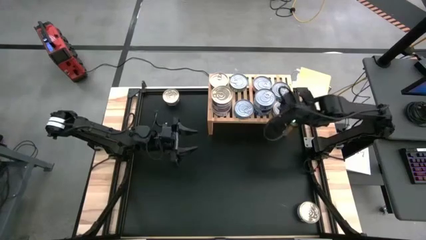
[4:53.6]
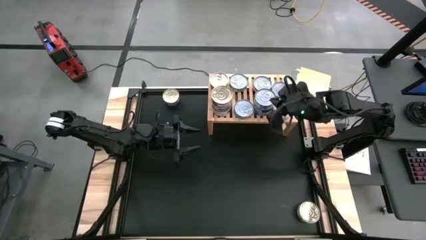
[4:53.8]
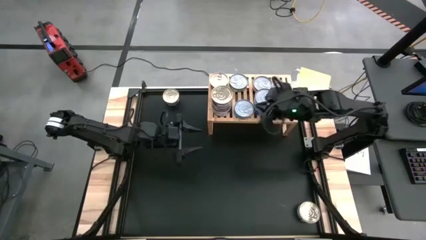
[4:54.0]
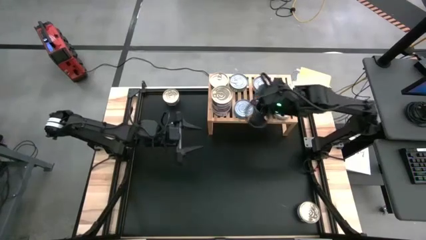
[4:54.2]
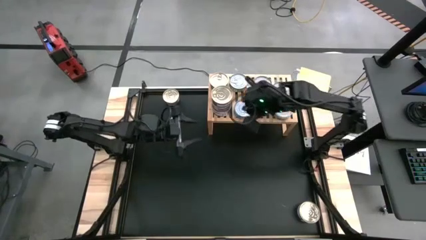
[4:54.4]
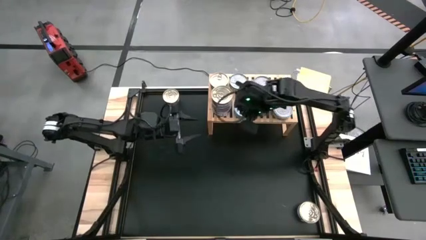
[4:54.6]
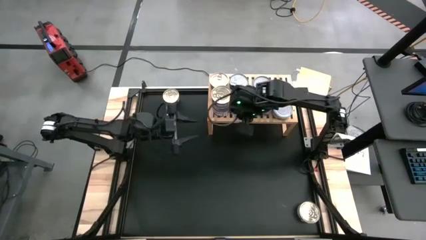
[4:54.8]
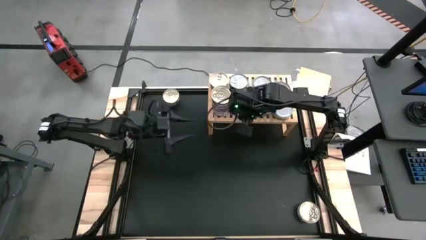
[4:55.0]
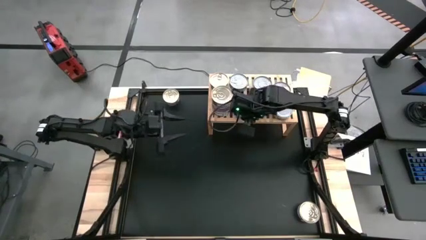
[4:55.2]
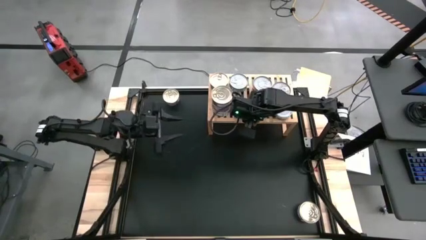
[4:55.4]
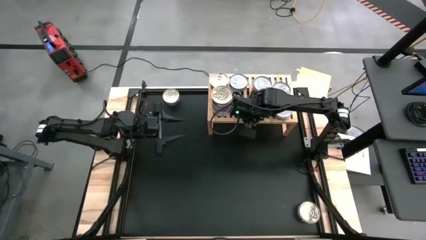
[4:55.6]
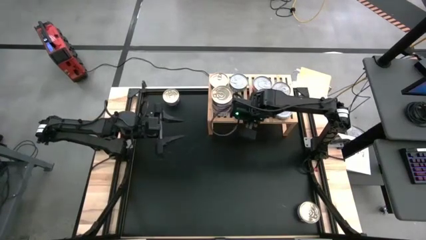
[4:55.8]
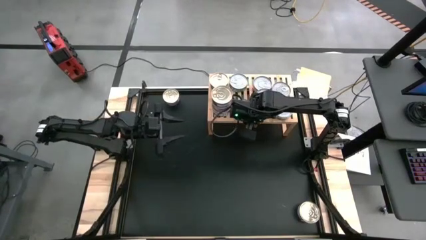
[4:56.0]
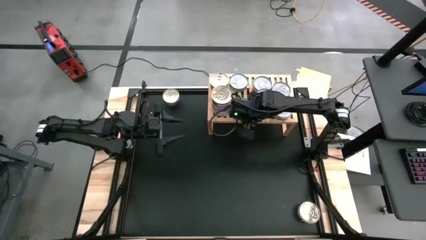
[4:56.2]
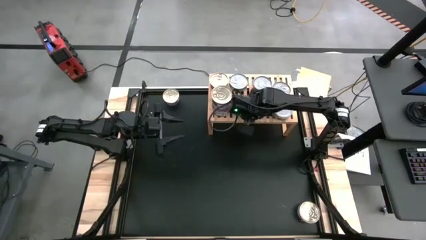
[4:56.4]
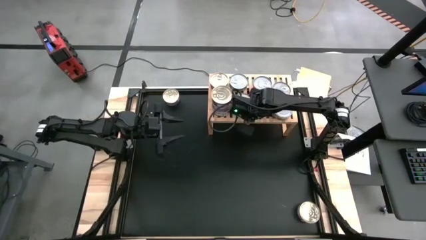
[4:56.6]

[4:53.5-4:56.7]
Task: Stack canned seafood by type on shelf
Adjust the yellow-blue tuna can

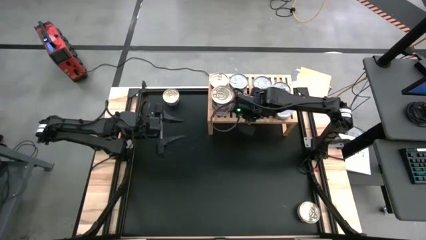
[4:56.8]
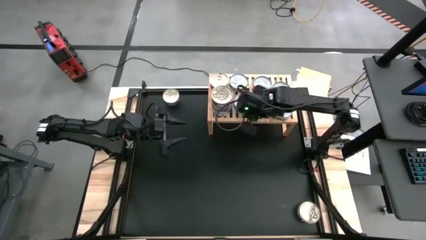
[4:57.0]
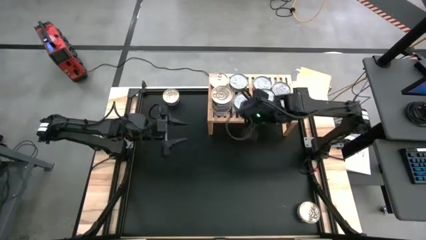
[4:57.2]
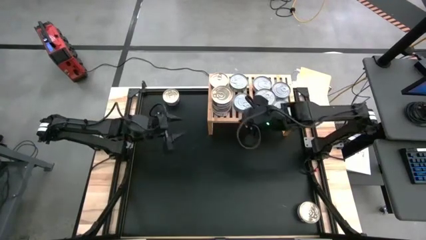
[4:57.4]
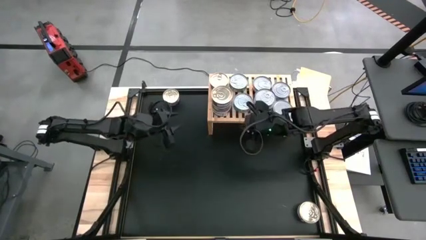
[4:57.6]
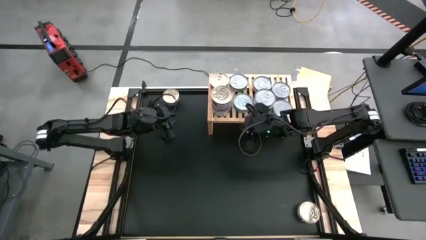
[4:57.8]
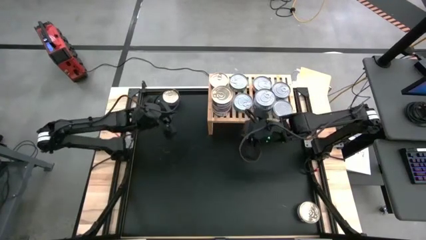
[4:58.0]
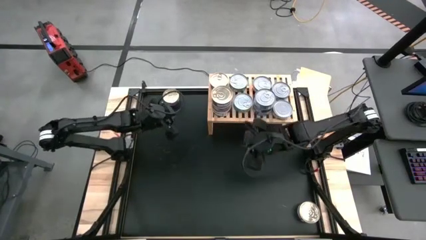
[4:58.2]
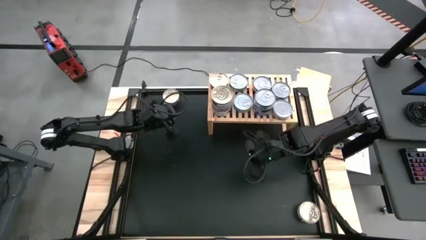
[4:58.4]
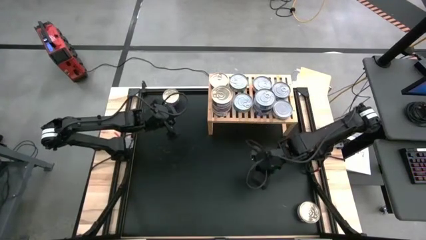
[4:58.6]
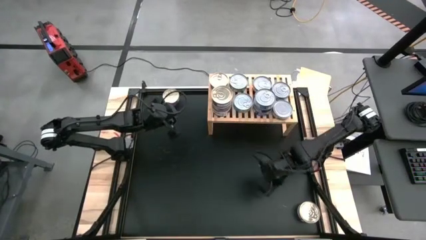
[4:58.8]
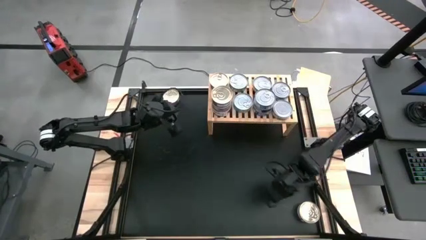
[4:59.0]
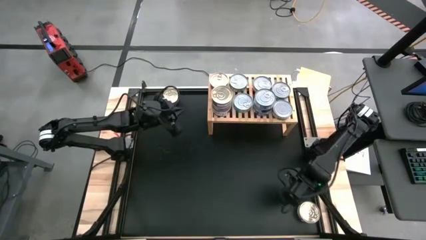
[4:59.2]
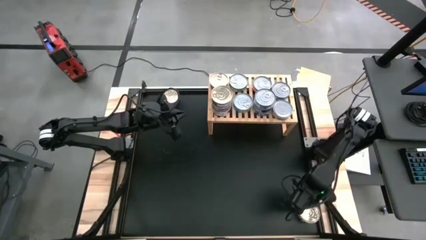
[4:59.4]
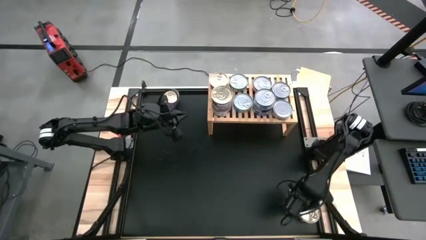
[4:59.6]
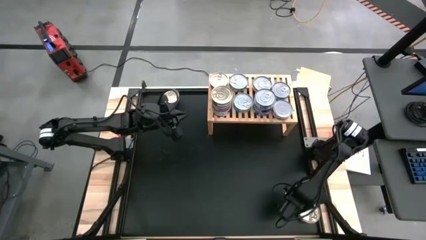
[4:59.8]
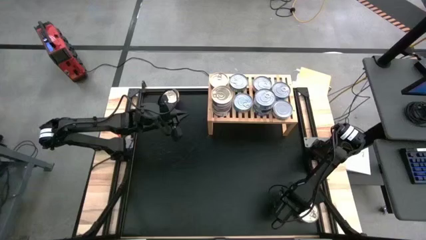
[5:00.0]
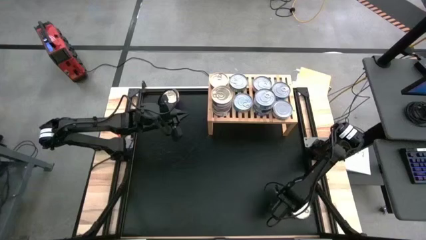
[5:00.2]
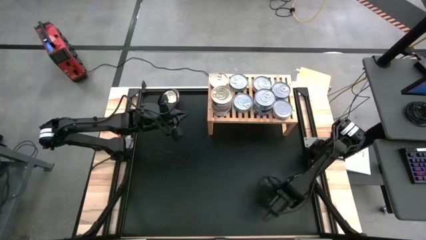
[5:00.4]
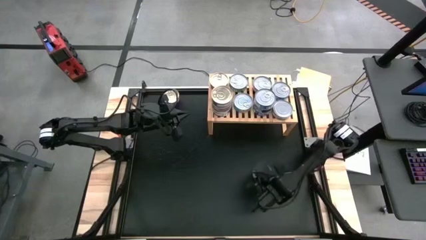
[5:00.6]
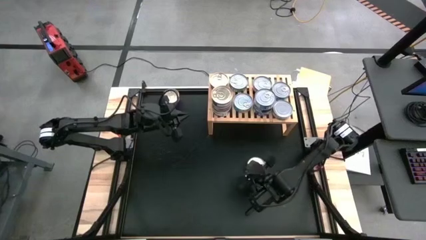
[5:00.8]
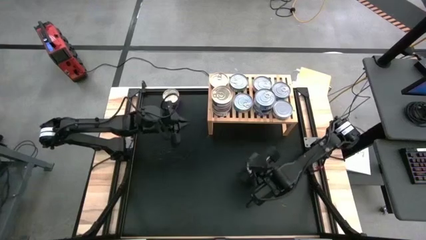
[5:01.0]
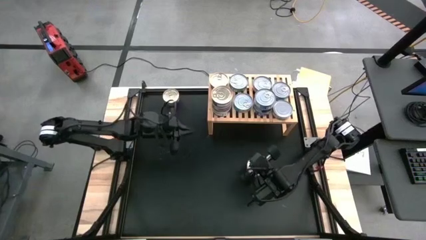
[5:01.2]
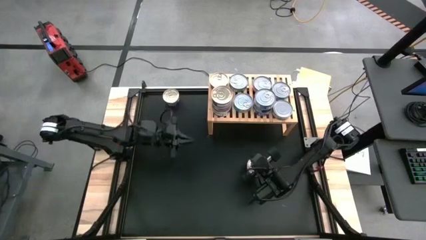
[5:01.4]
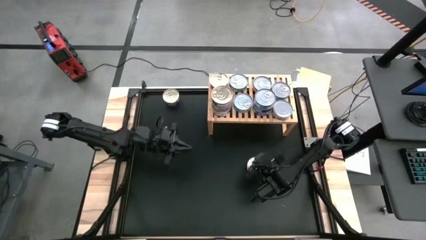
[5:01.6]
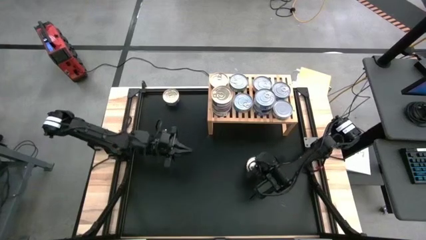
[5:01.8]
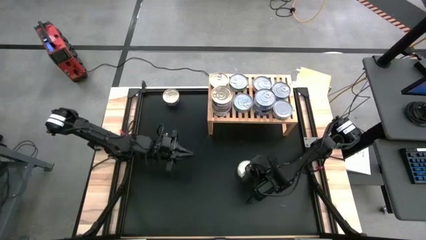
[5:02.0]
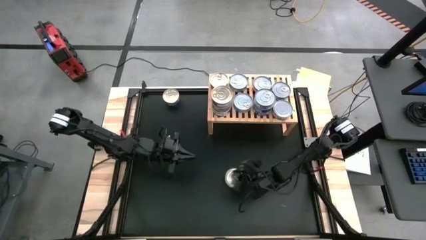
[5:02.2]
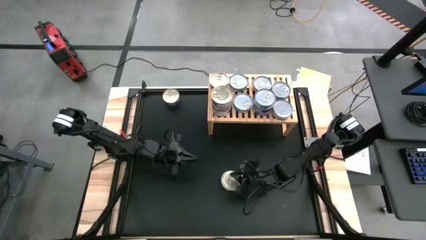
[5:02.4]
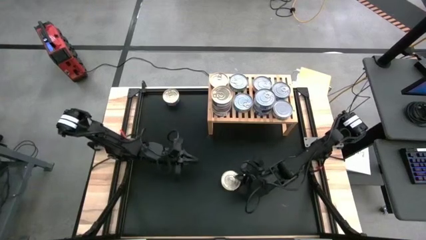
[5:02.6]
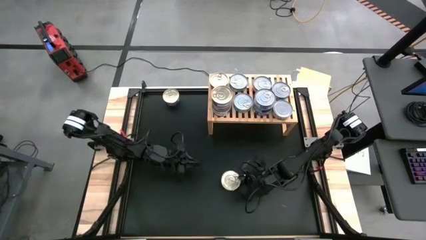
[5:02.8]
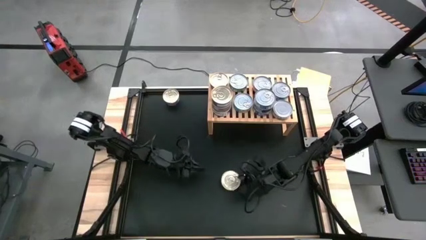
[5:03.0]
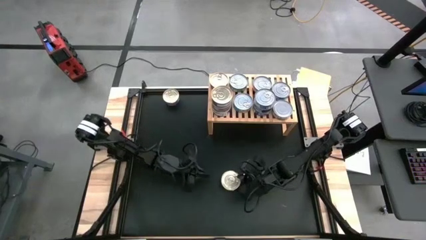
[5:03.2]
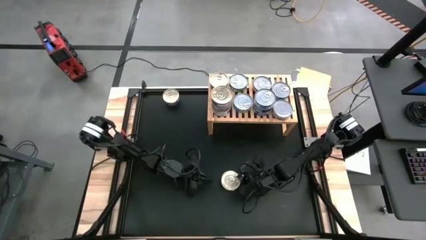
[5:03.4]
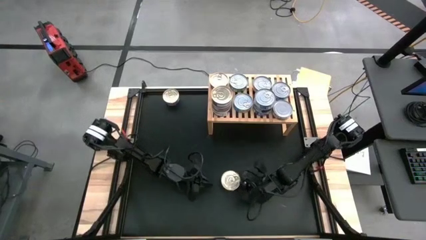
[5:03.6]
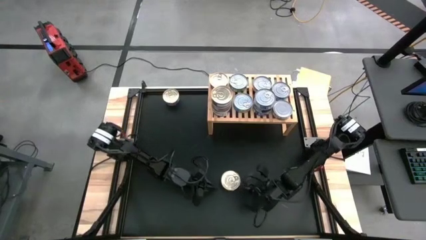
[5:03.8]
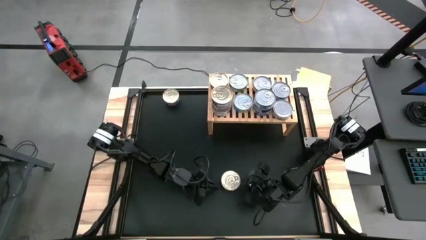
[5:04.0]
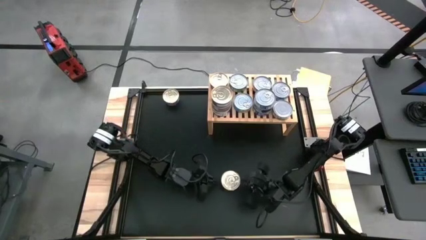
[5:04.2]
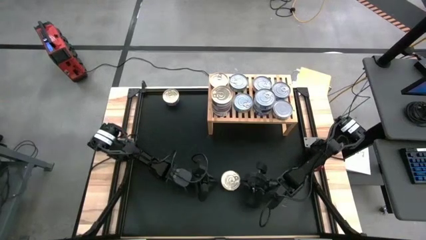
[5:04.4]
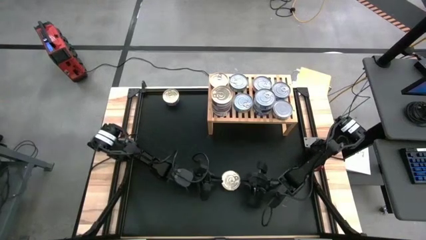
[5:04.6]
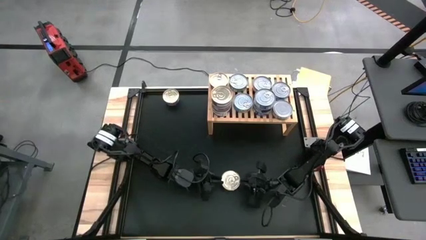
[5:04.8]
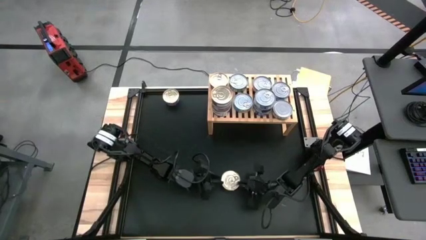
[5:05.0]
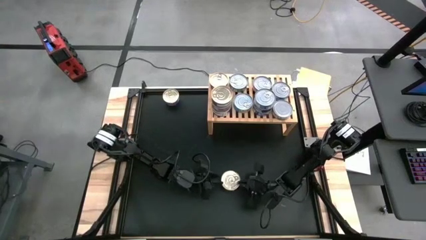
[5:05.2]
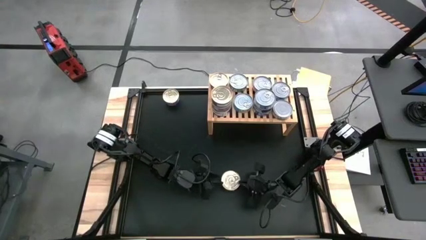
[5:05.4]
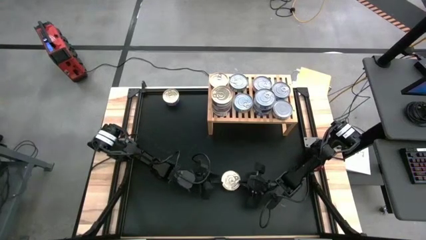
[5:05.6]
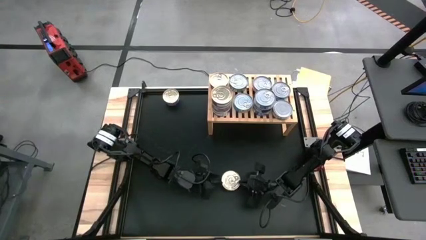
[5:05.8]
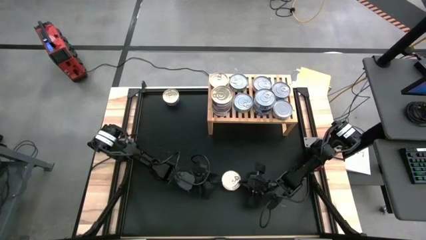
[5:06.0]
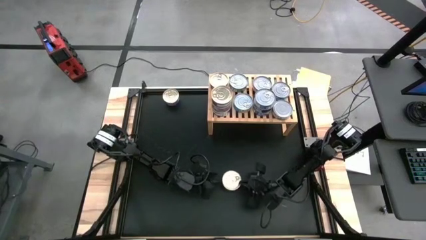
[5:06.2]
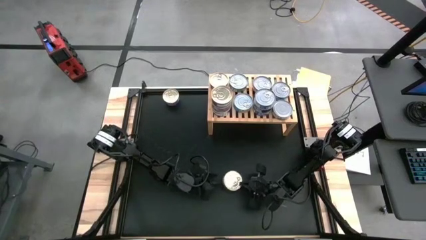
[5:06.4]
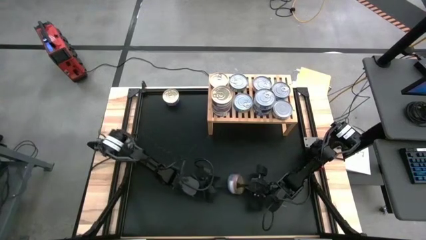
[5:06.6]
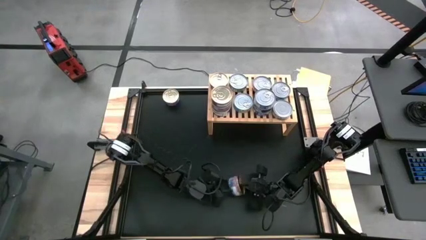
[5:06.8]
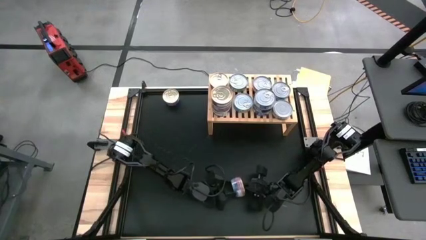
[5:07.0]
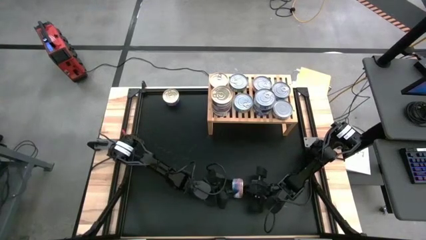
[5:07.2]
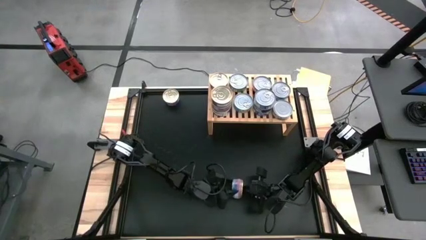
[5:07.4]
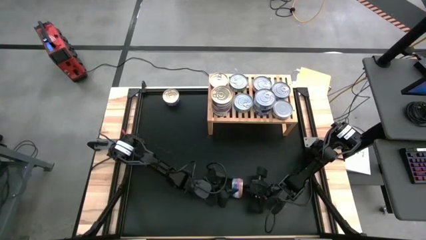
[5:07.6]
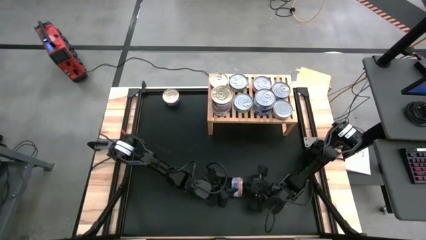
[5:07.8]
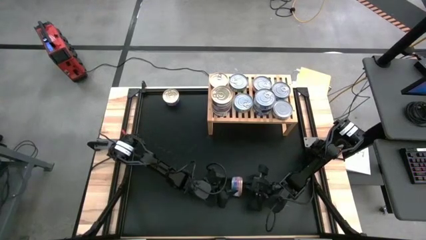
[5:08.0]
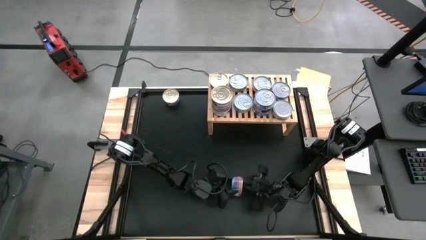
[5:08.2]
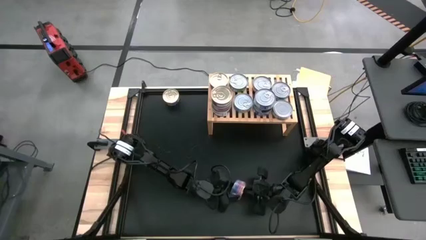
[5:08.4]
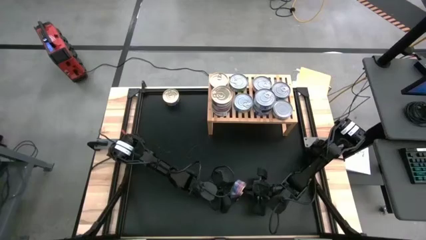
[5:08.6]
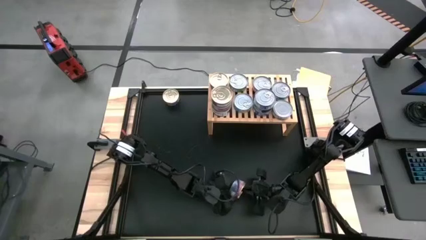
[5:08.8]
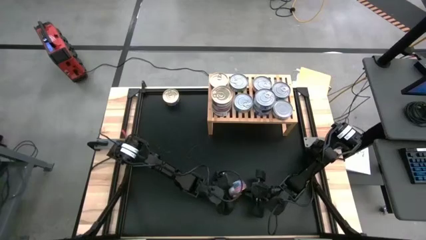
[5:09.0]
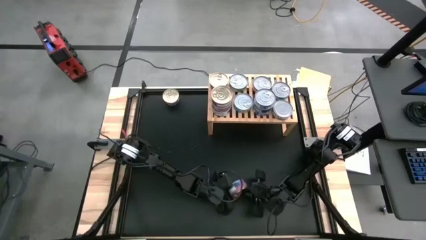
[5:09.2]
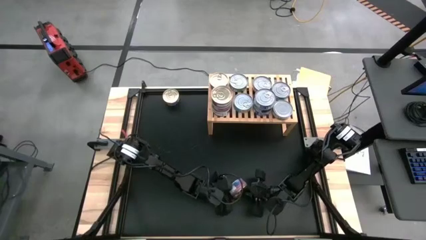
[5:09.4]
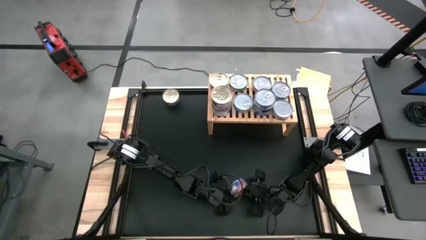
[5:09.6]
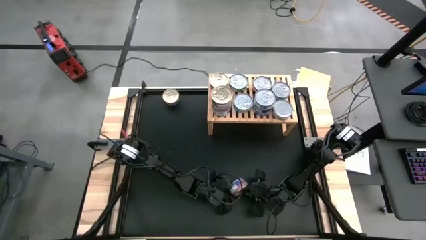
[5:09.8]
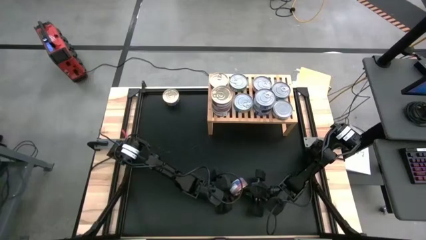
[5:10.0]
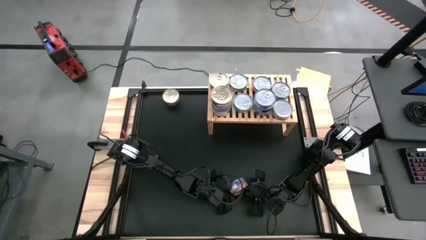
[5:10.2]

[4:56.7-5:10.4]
Stack the blue-pink tuna can on top of the blue-pink tuna can on the shelf
